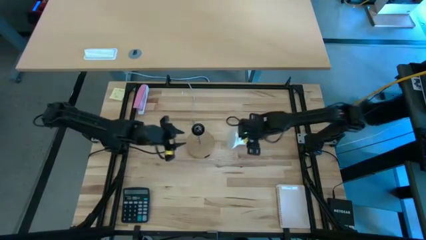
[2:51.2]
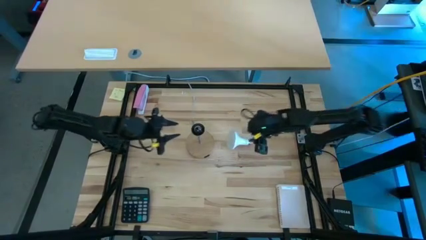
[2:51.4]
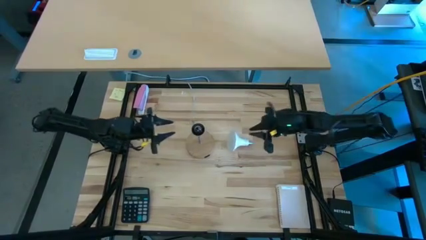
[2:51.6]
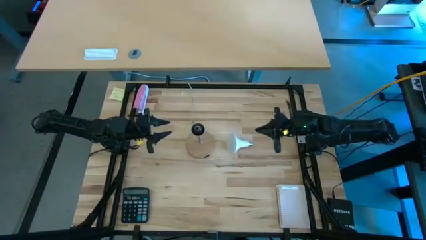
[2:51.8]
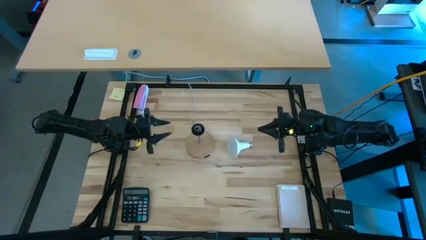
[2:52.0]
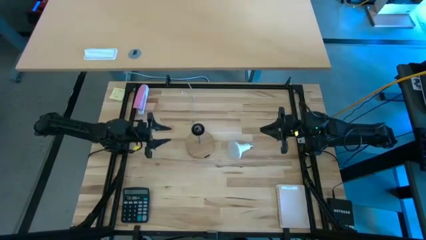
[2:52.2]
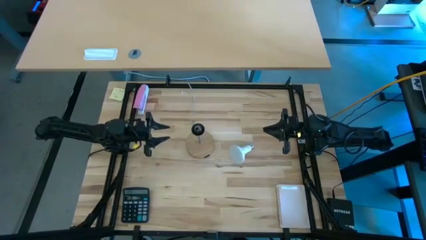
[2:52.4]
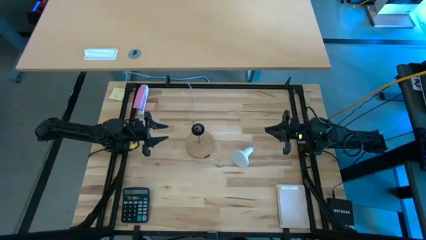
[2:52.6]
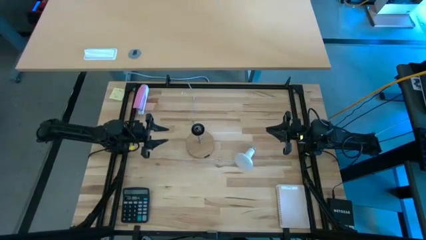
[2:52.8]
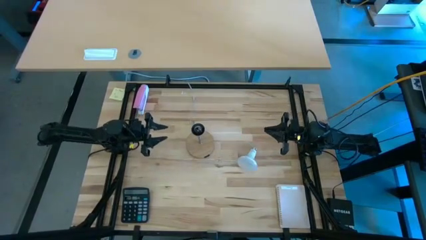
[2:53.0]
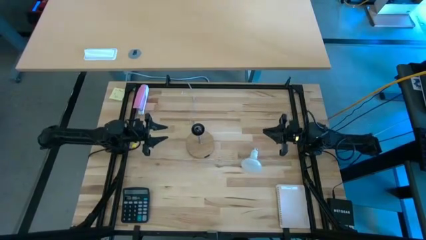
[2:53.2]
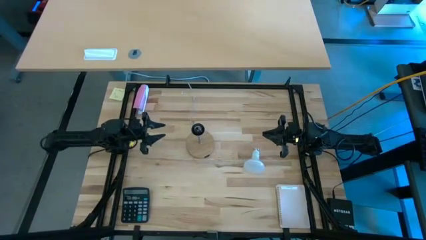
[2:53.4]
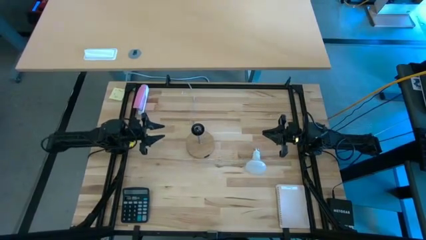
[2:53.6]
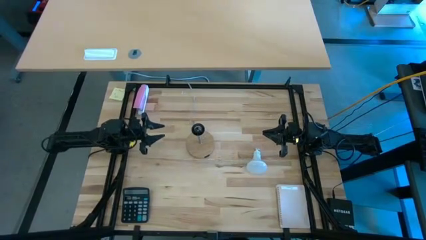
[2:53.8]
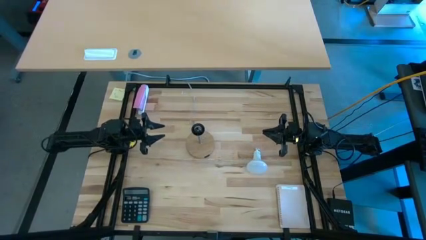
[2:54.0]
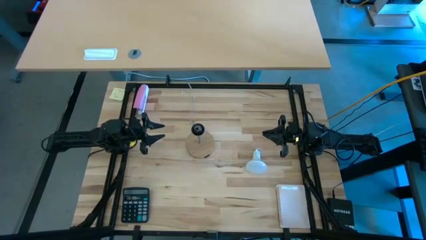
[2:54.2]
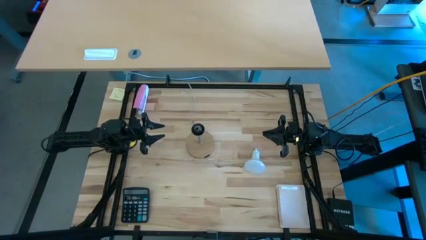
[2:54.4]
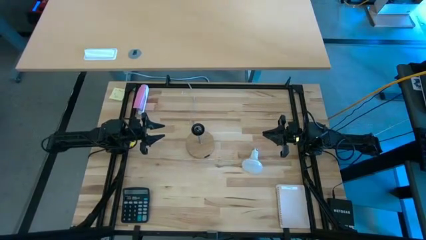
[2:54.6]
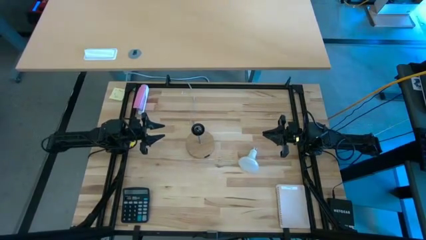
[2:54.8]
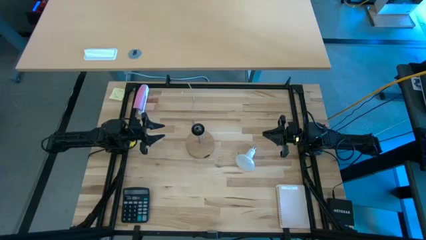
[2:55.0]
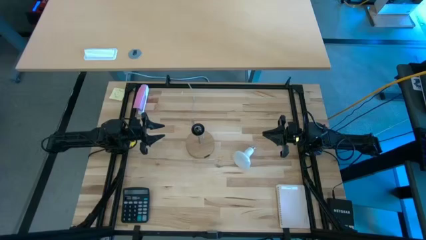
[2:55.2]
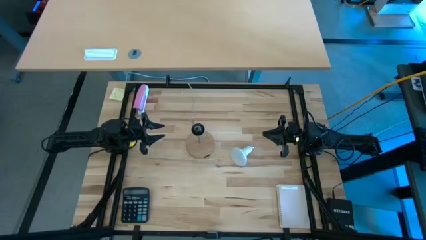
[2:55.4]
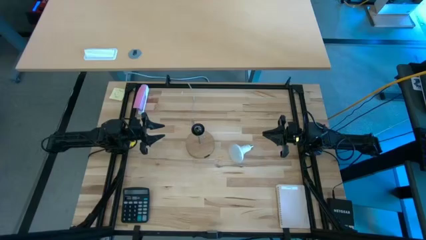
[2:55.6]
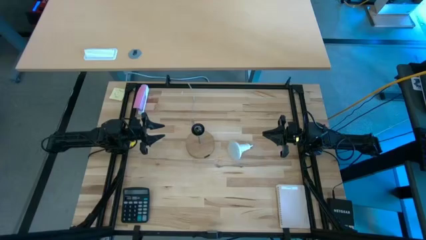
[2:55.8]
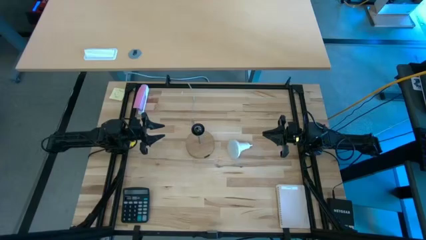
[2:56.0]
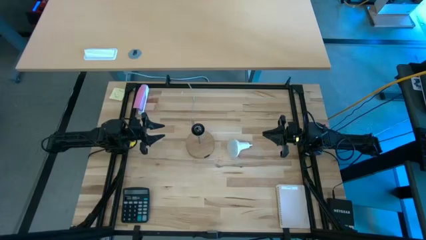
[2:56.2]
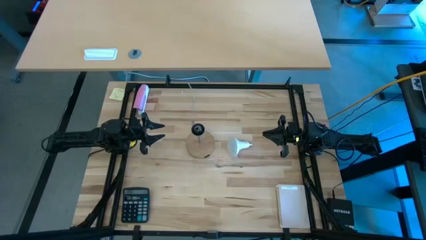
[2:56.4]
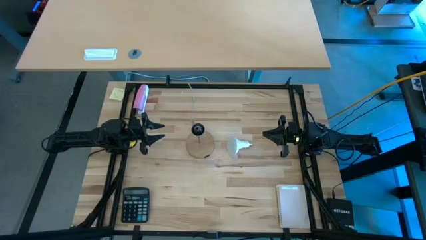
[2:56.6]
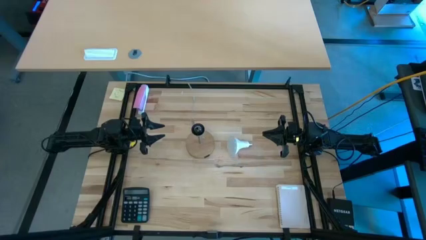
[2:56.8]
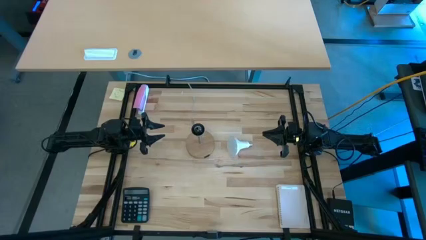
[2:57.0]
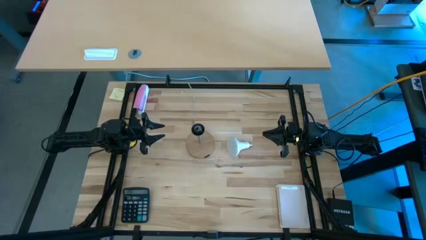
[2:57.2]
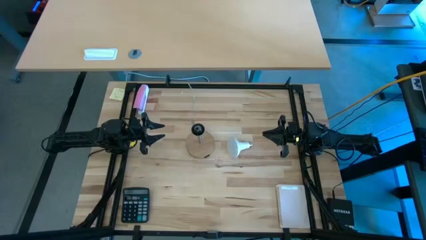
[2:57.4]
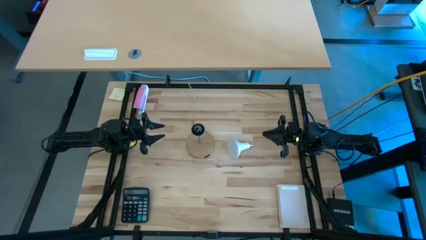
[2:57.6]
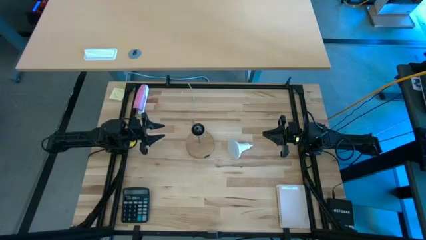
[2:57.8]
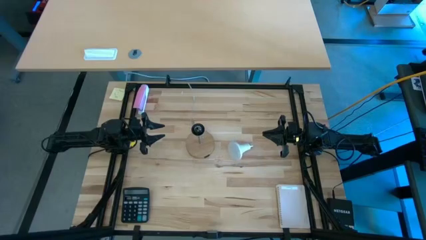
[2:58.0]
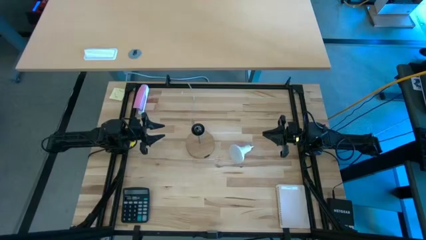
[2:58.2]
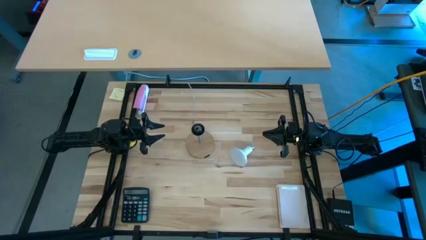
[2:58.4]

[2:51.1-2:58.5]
Task: Screw lightbulb
Return to Home Position

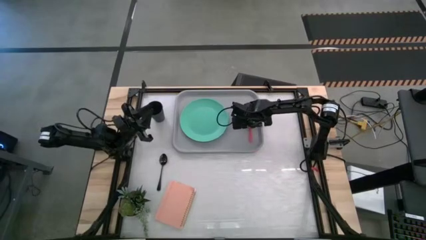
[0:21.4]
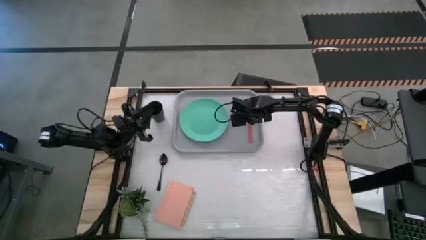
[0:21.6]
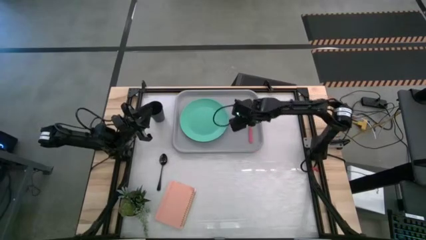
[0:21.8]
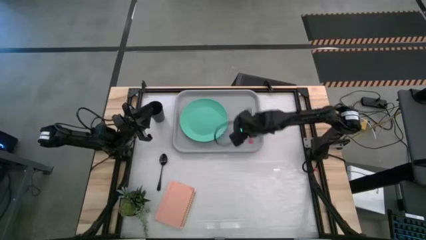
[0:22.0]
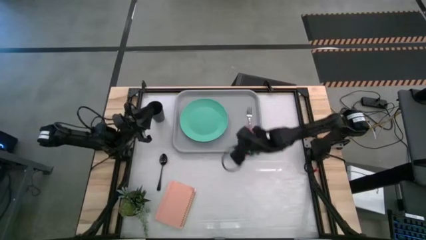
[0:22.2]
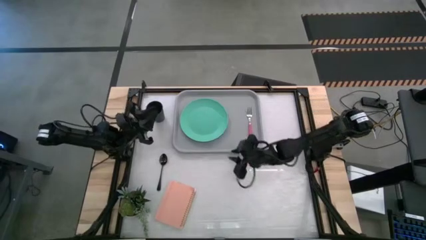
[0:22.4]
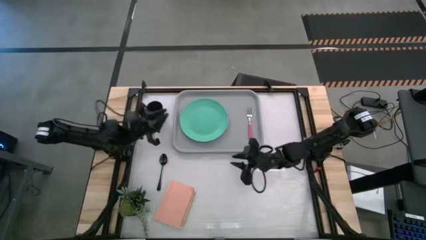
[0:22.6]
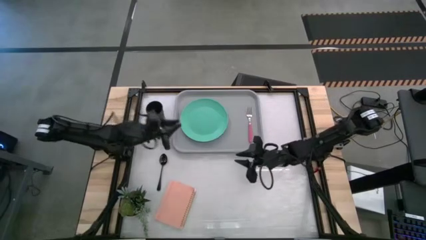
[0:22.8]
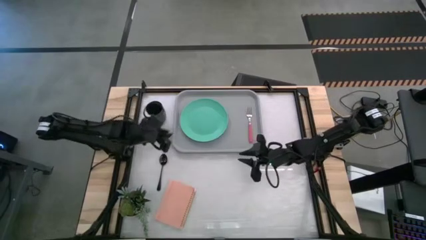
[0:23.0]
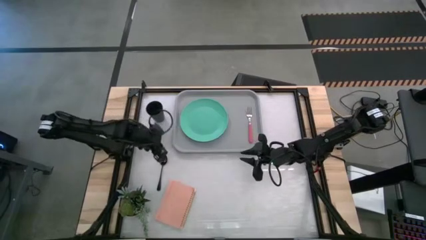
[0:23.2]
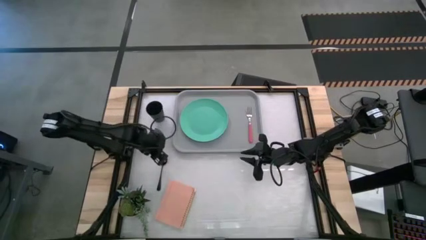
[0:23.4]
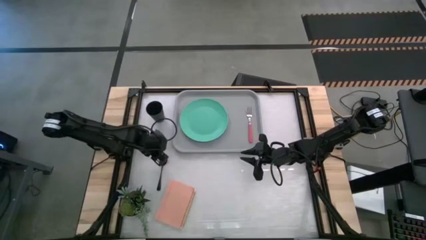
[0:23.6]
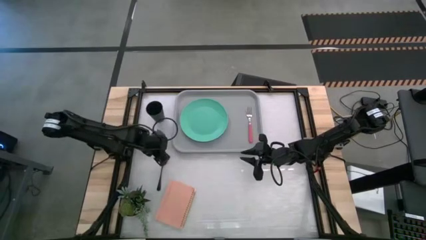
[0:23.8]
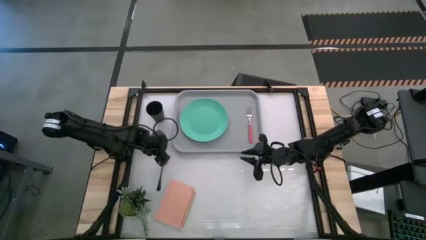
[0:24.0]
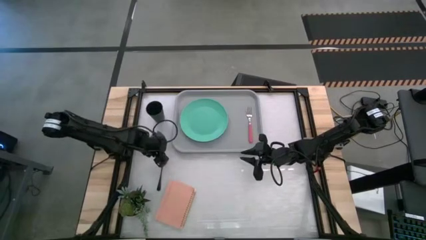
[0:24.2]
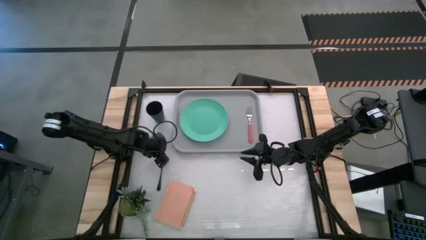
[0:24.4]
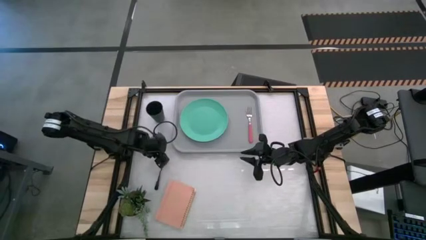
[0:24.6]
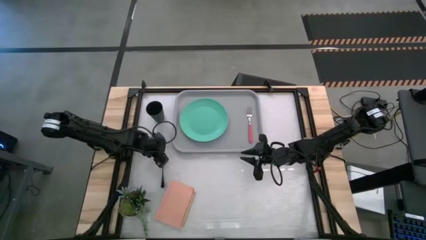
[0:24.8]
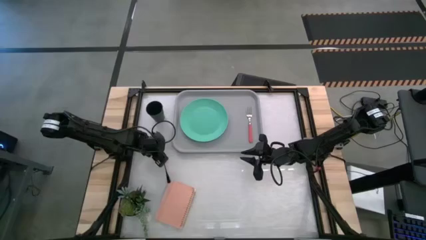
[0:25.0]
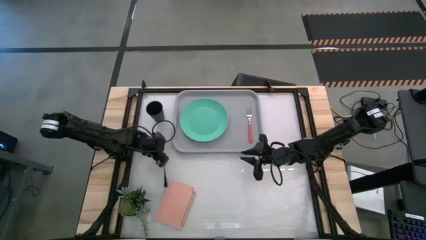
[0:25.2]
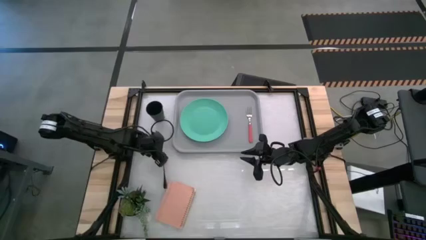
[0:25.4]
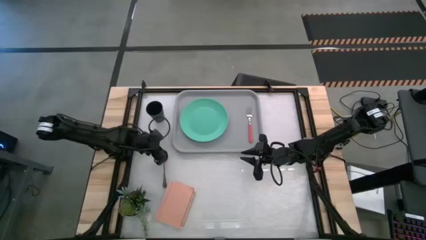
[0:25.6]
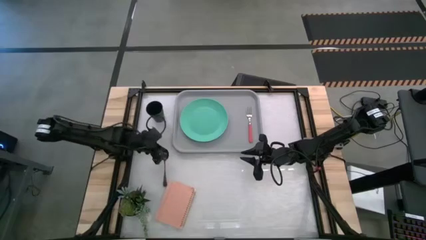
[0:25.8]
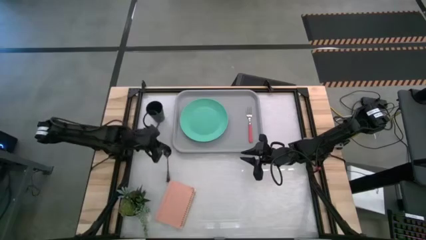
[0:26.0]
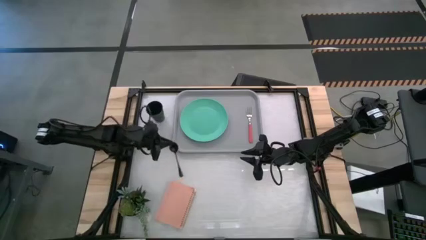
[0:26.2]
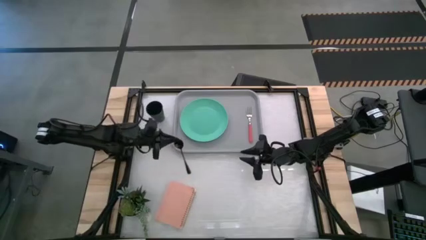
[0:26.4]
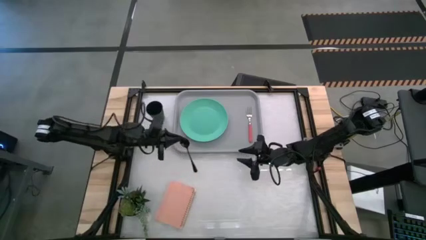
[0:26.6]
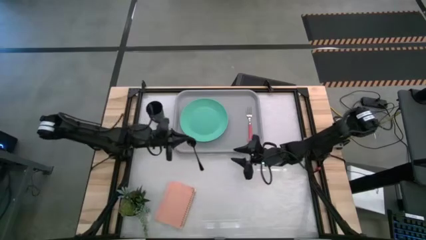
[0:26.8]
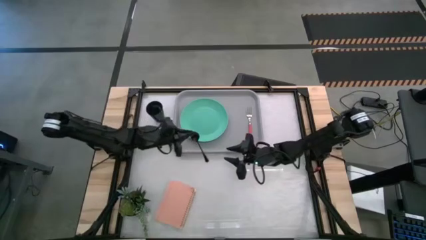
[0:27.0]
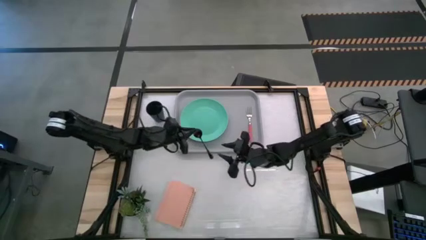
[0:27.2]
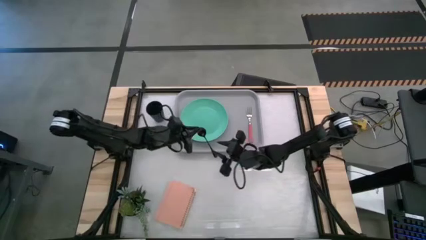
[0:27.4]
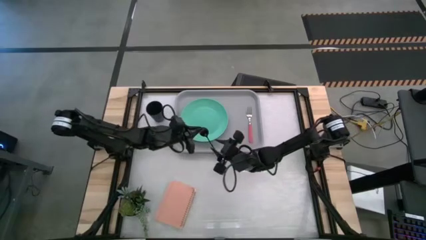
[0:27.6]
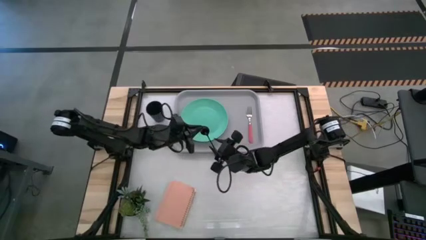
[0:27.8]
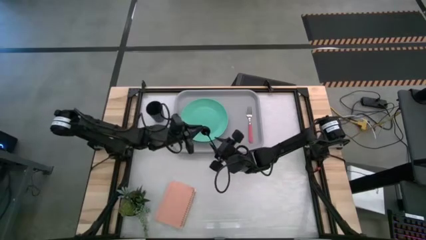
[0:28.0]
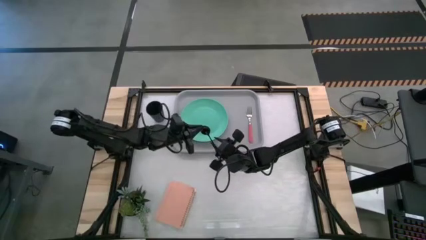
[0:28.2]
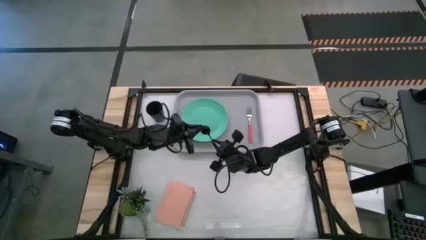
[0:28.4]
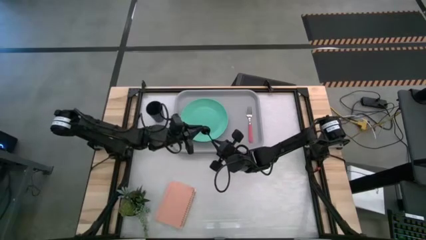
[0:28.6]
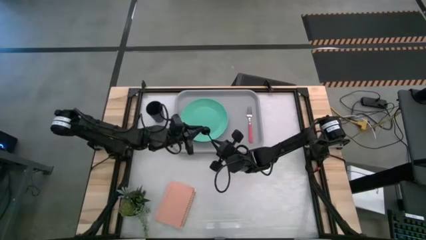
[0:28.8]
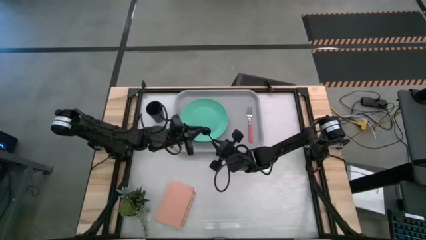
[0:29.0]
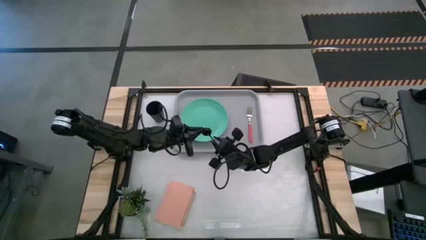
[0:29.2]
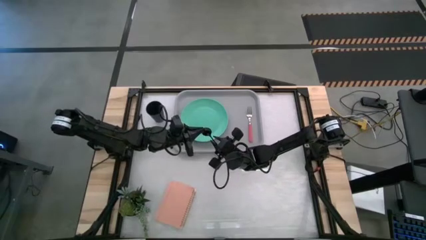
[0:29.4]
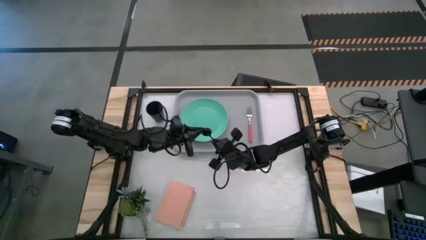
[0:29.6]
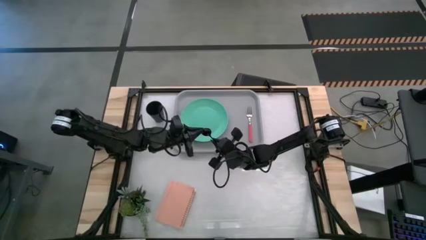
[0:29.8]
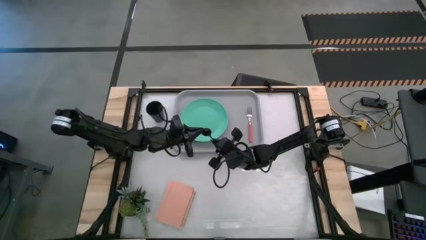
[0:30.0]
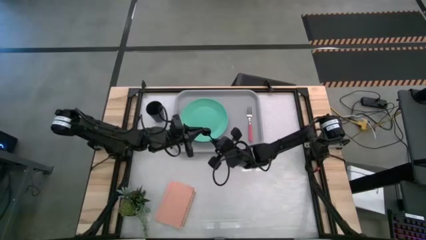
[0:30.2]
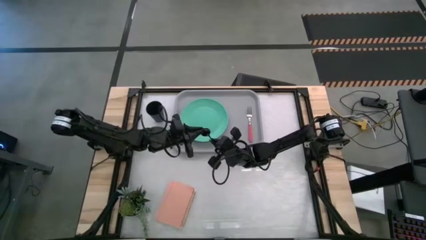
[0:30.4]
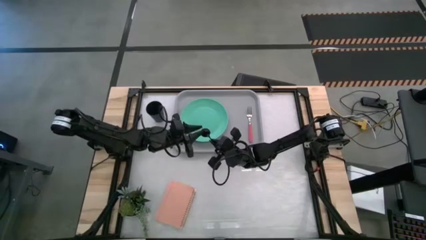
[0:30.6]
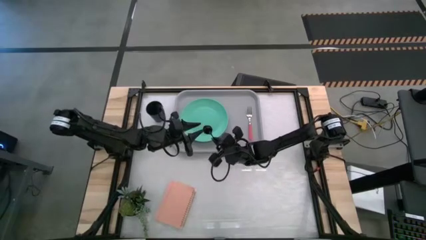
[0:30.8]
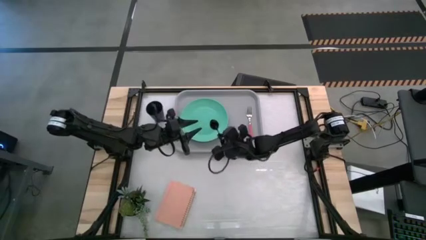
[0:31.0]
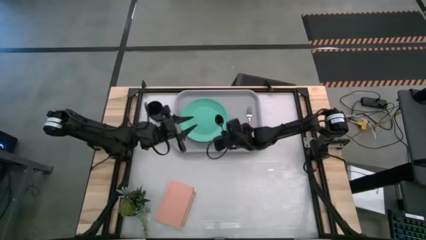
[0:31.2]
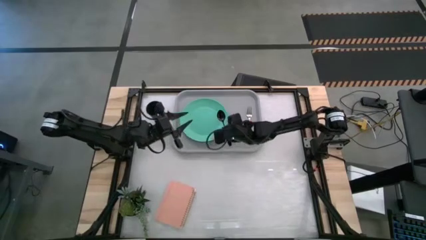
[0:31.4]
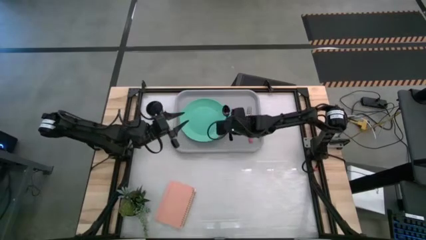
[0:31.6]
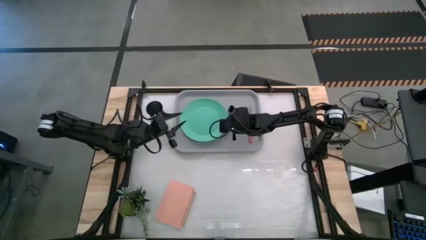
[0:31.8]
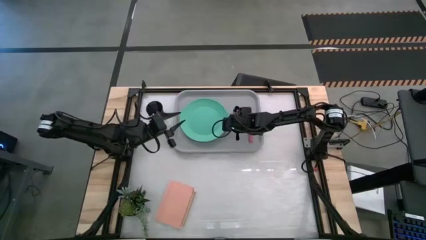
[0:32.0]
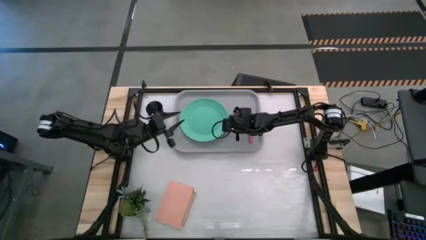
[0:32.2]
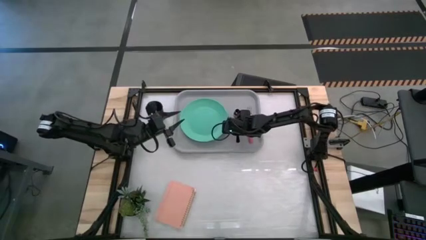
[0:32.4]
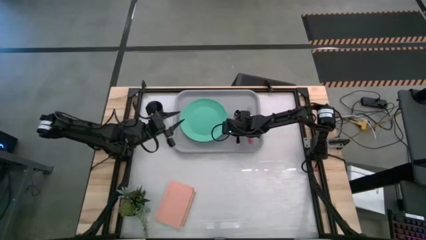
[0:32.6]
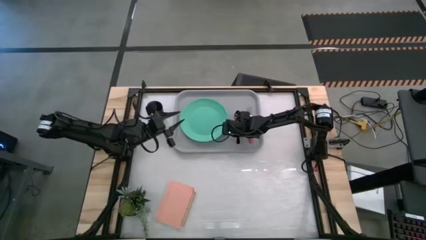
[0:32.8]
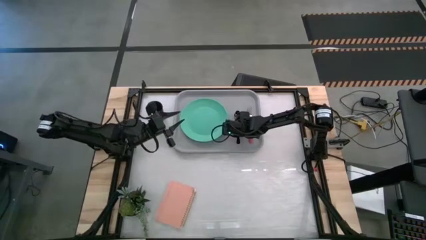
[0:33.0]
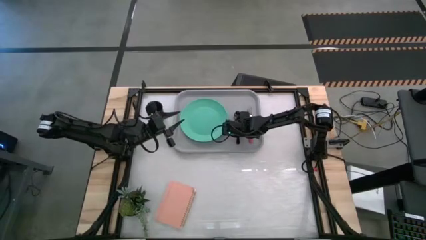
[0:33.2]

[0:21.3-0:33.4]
Task: Pick and place plate/cup/fork/spoon on tray
Put the black spoon between the green plate and the pink fork on the gray food tray
